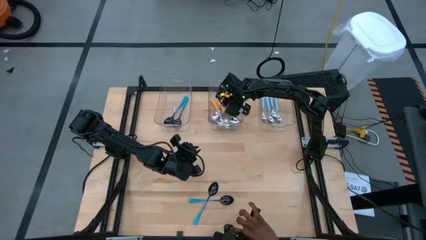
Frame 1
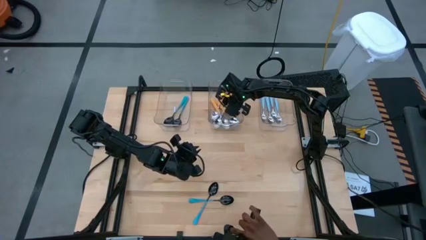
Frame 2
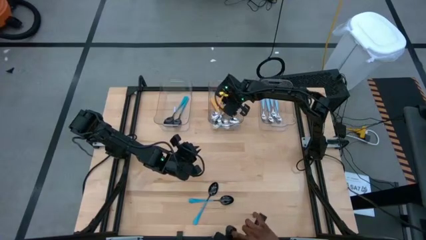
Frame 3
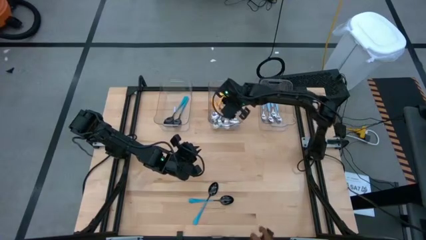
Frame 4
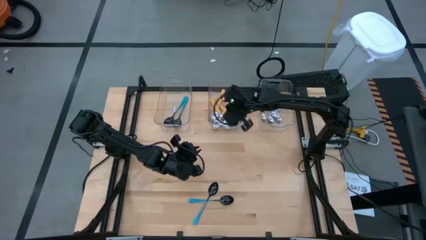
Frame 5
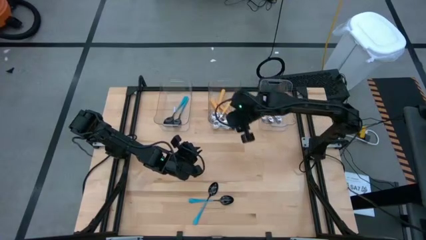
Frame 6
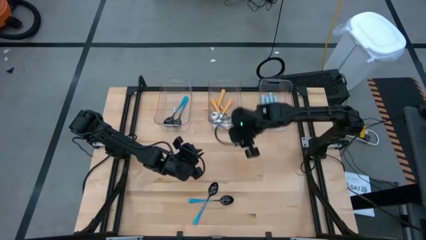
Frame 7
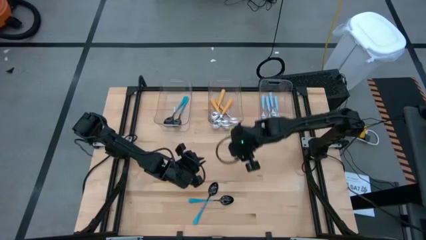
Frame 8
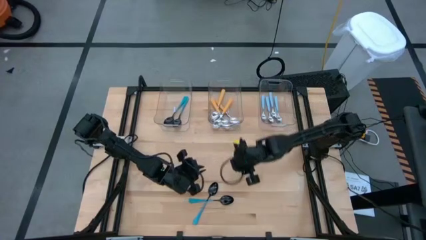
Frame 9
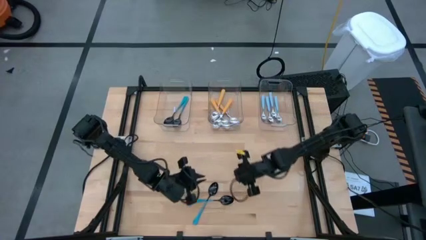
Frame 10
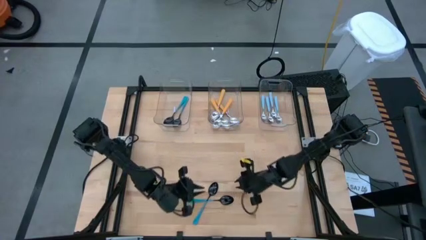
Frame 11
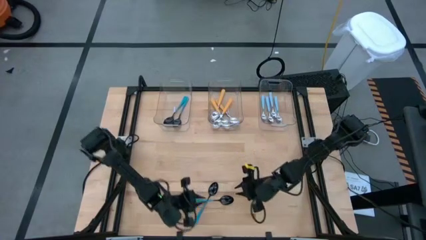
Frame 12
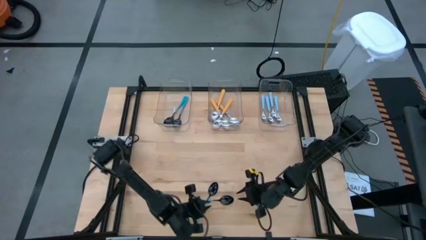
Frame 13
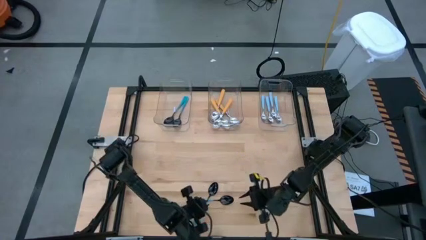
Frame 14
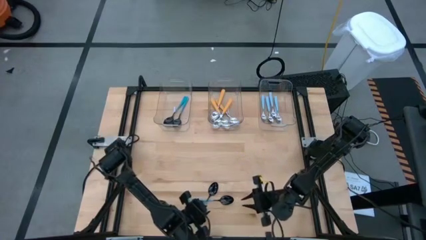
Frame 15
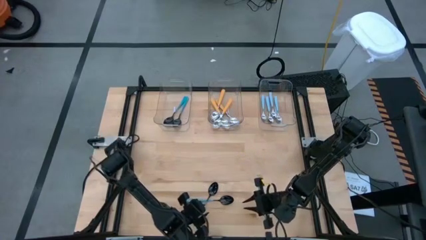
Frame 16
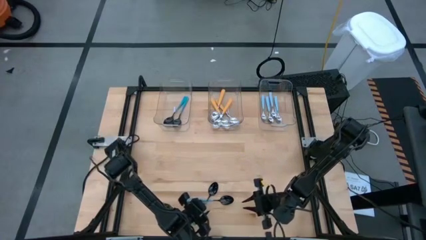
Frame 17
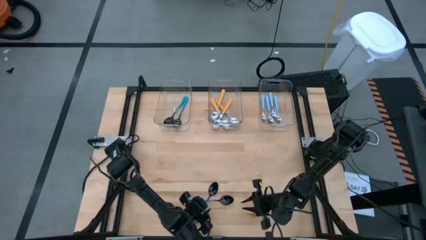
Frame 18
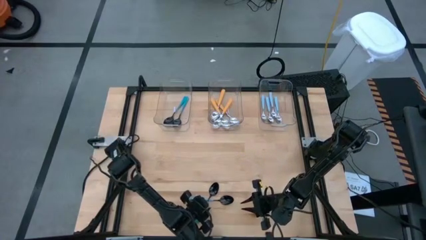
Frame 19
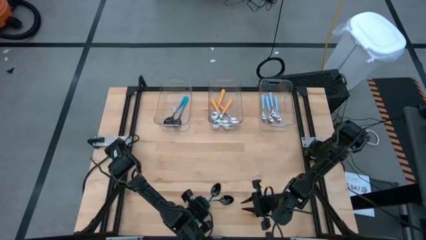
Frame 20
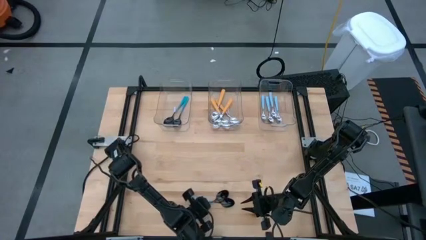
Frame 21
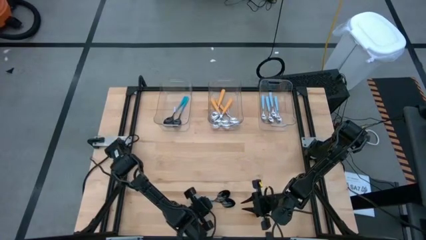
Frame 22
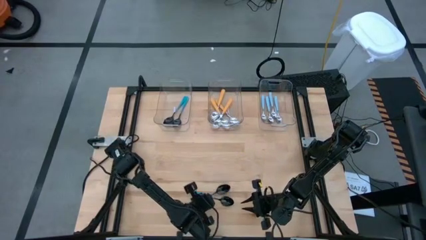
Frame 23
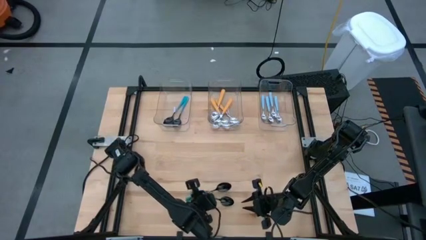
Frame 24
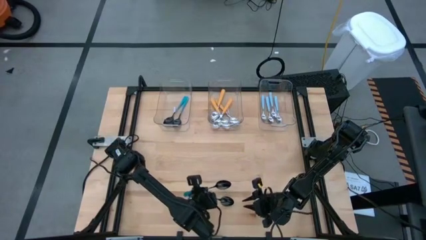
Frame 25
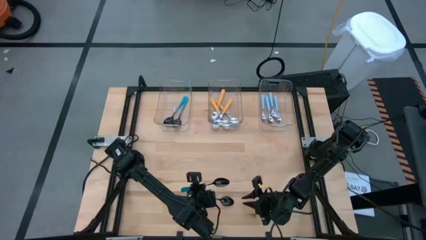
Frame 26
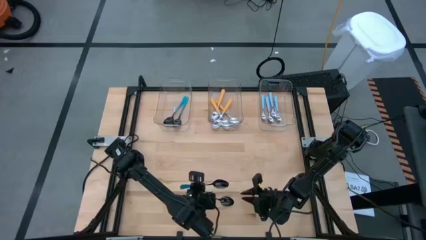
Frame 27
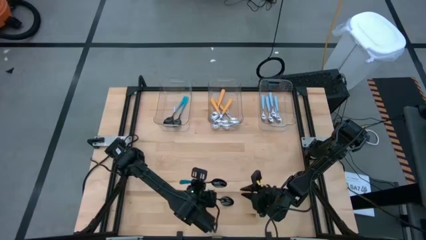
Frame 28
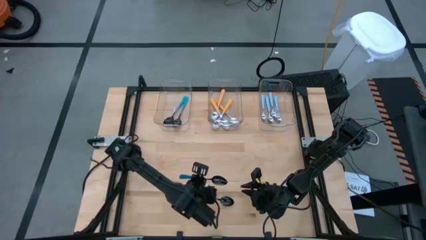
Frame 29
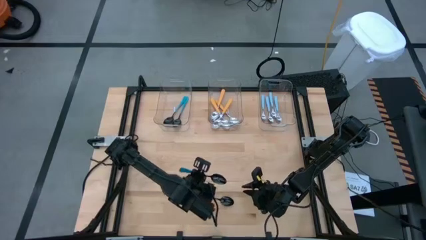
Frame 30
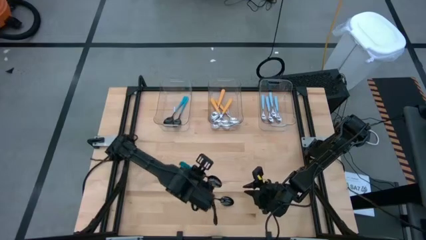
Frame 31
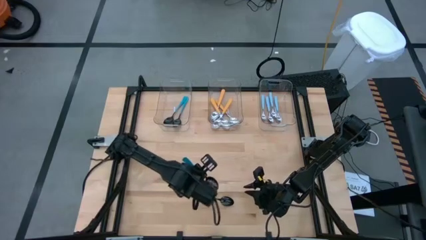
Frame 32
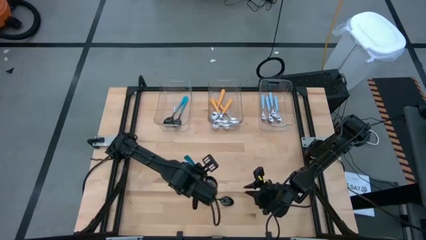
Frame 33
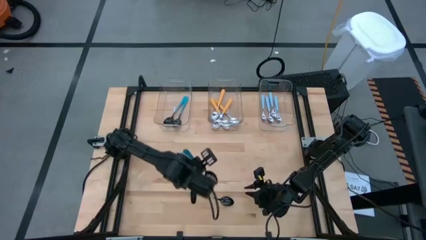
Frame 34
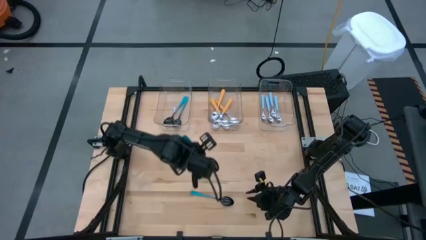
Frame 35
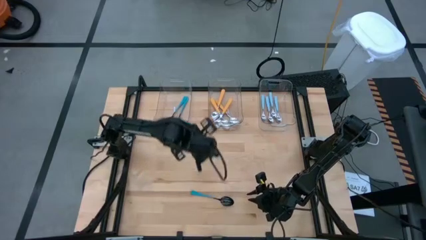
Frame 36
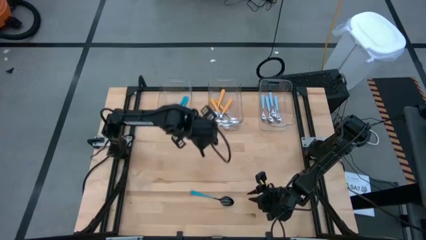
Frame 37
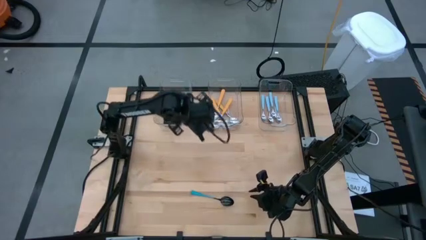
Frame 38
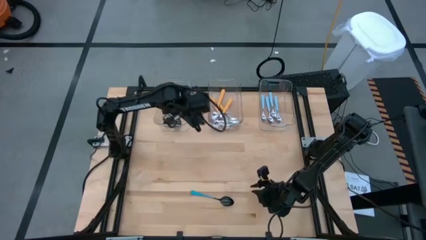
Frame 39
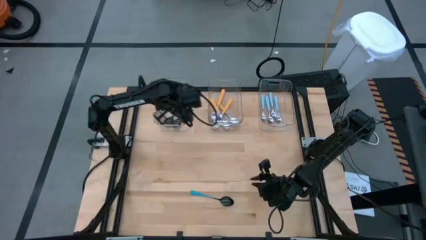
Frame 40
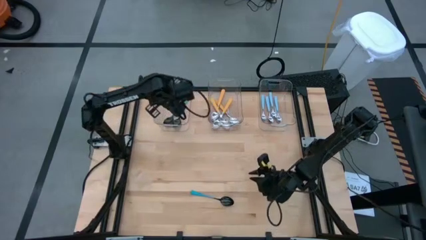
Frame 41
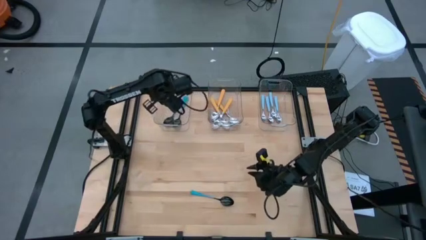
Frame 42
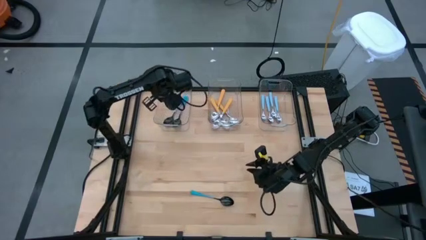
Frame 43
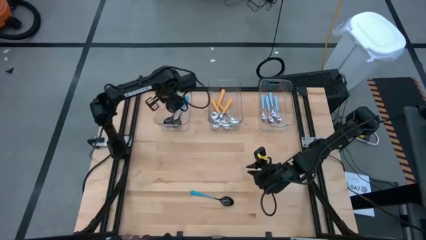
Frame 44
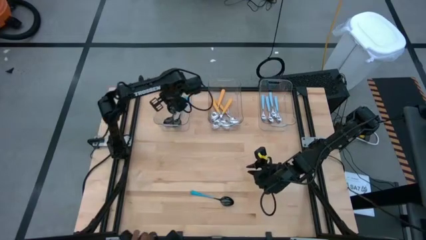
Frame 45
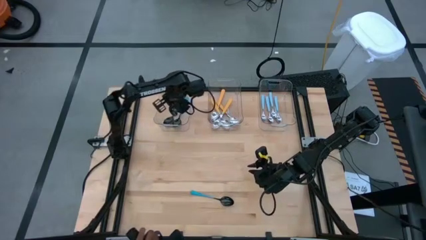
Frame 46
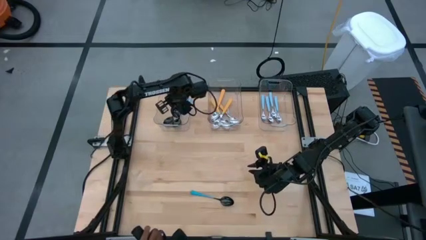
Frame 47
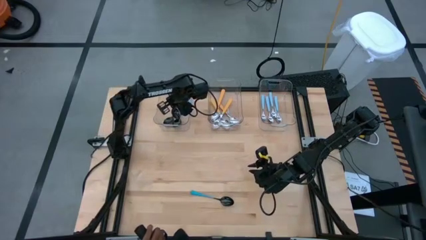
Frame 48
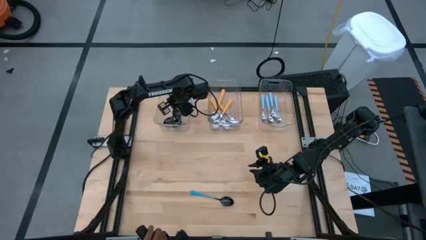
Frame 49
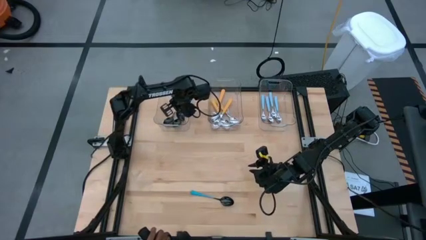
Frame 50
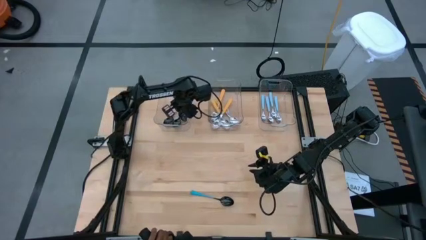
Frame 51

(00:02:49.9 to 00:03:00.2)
Task: Sort silverware by color (type)
Put the blue spoon into the left transparent bin

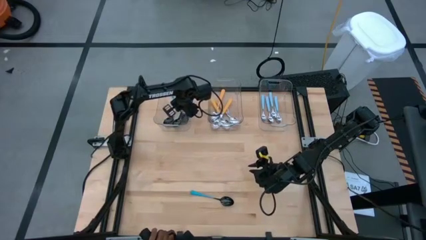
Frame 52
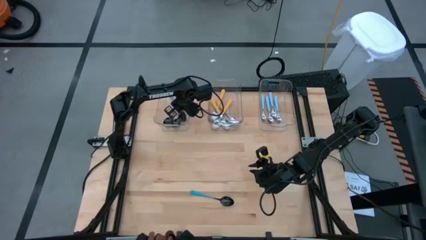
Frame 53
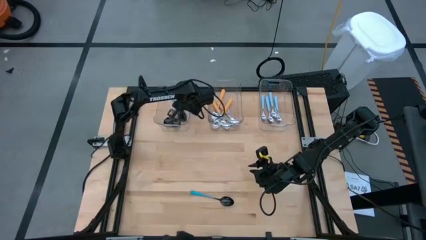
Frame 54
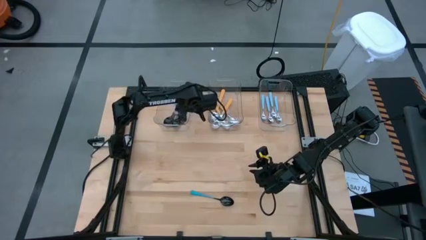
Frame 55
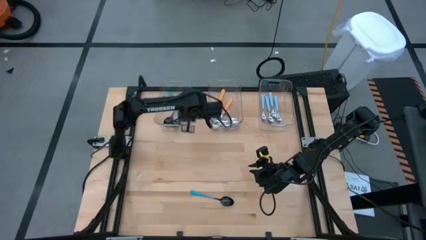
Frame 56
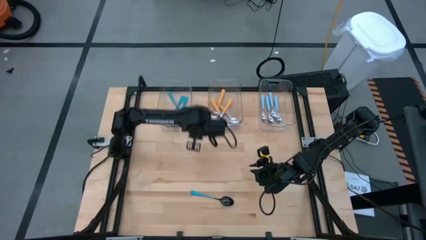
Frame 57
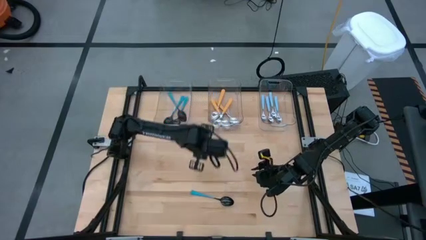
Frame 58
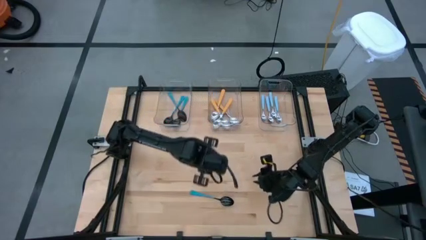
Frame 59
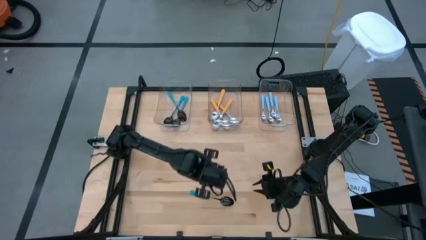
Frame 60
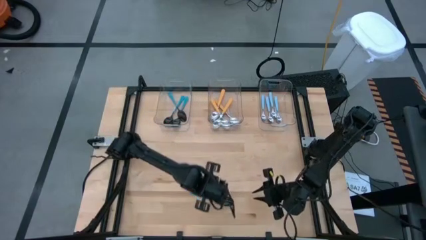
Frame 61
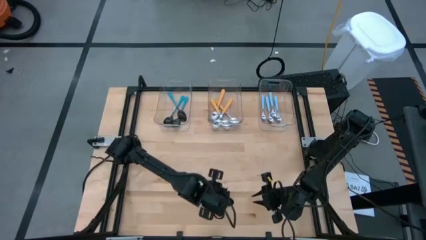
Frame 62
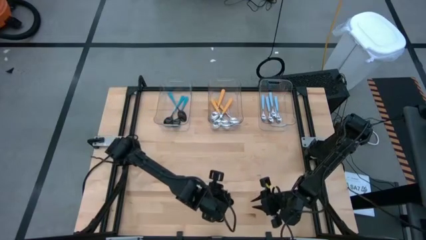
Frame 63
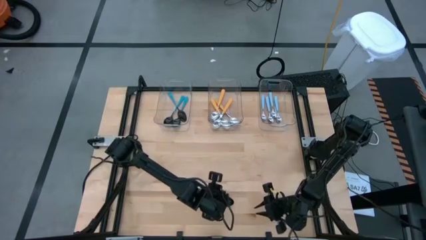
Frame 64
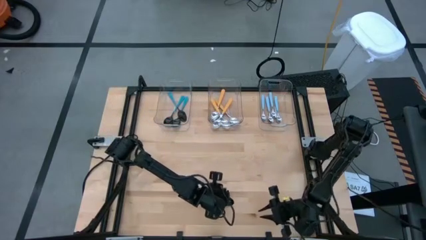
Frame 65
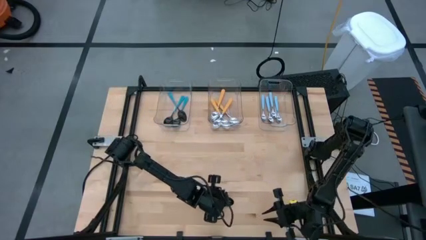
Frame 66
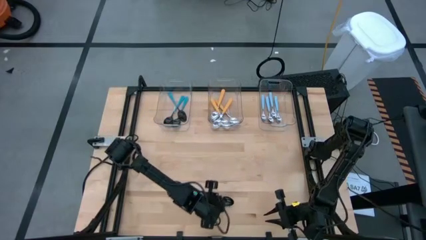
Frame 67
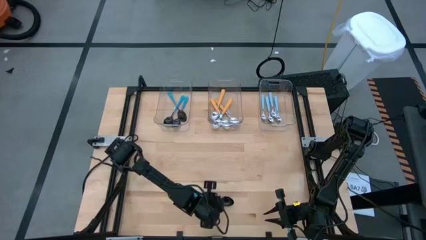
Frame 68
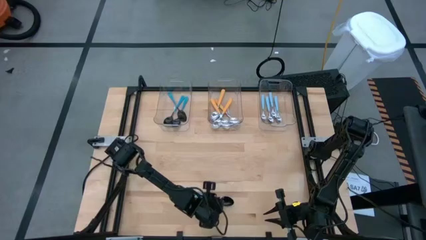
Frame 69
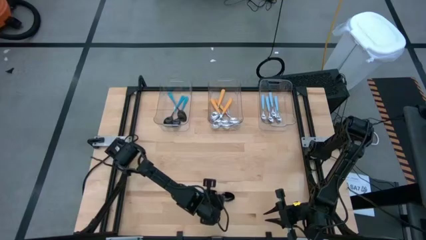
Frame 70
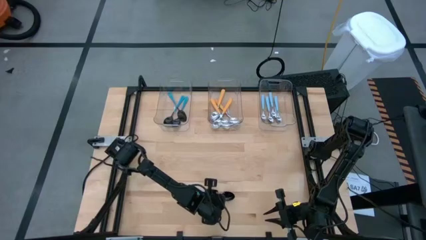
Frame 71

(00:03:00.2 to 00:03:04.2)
Put the blue spoon into the left transparent bin

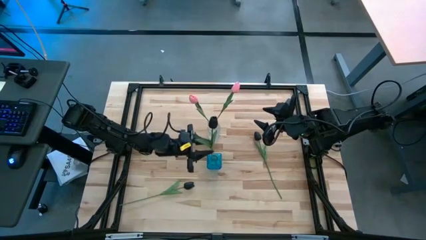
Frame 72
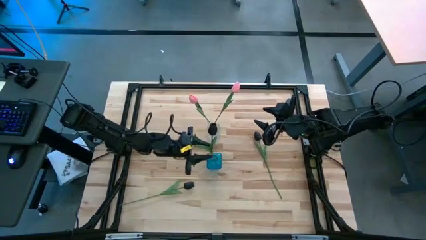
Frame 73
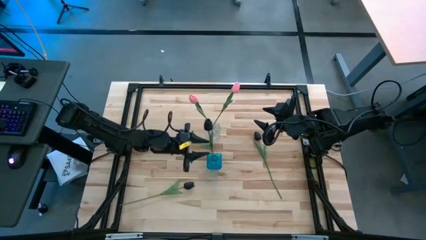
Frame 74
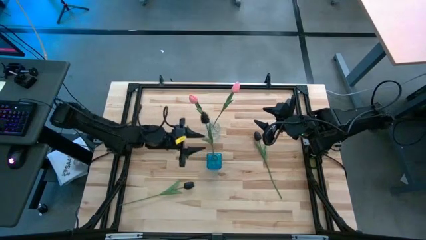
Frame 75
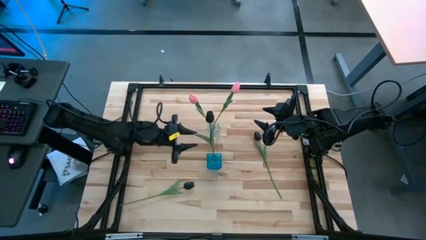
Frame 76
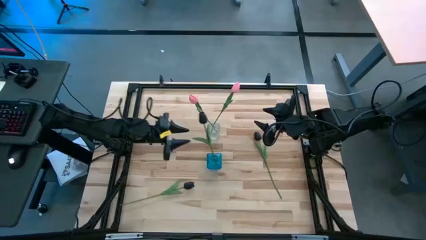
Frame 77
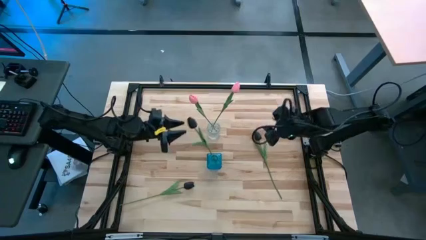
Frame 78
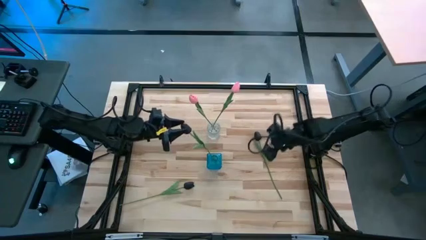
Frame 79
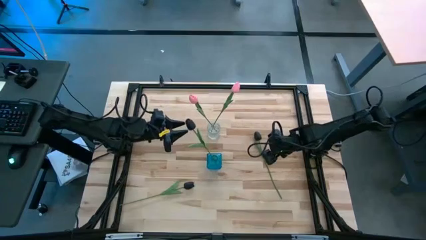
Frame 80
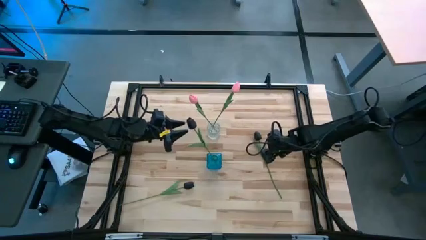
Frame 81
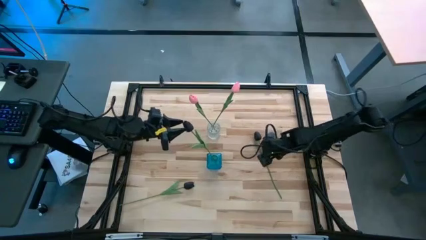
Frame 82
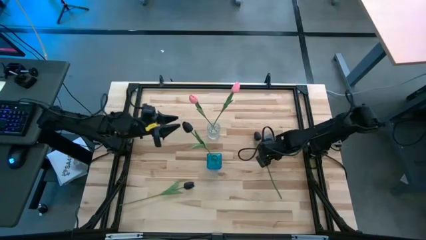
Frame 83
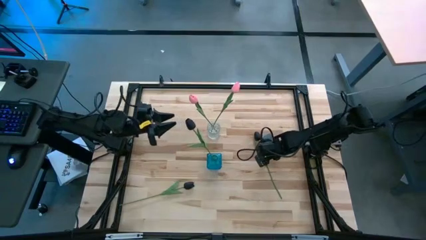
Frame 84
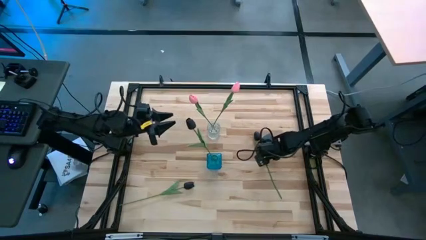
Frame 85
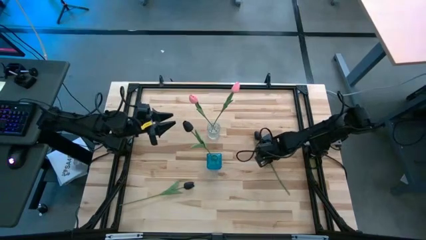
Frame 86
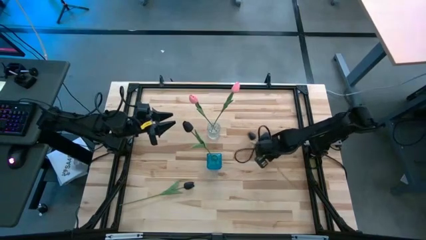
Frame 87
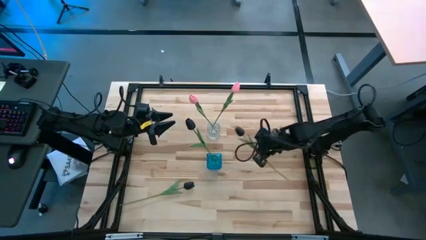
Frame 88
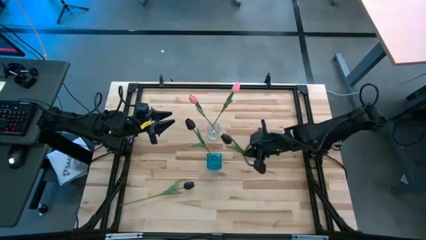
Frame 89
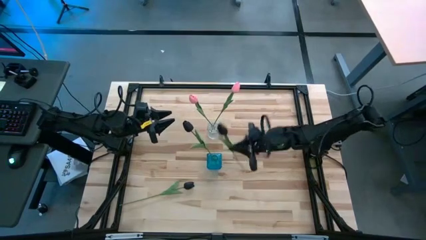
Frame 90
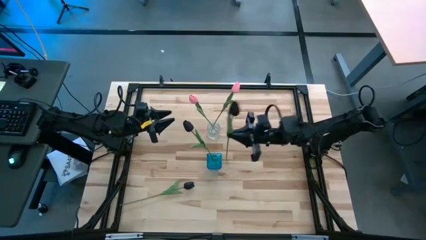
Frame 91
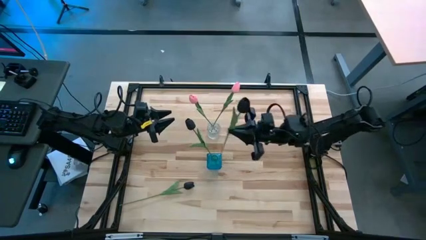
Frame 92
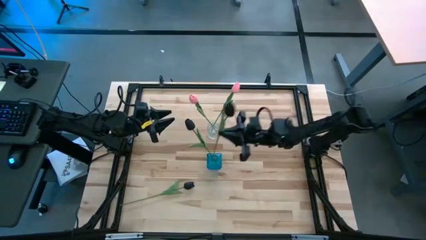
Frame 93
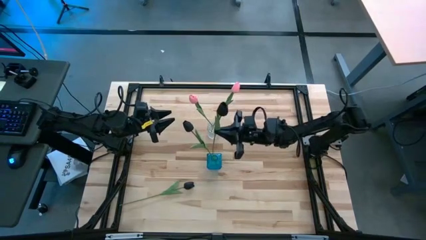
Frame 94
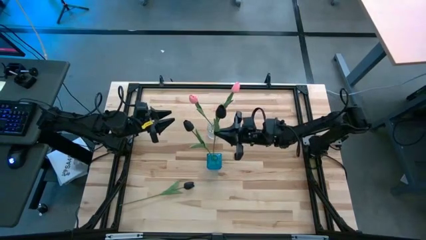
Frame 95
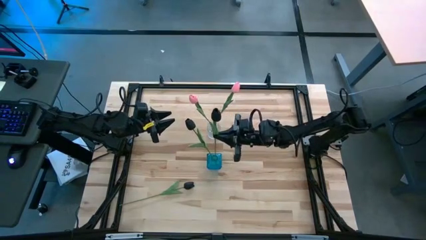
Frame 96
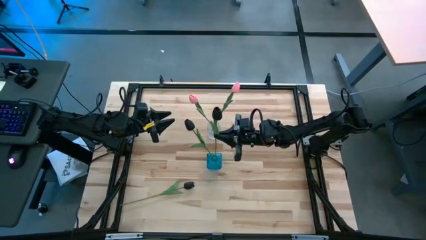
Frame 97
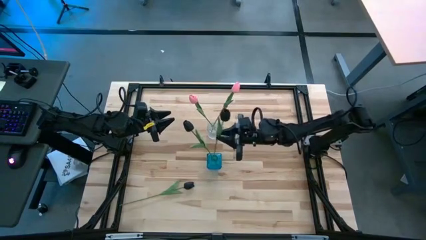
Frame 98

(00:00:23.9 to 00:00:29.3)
Task: Sort flowers into vase by color
Put the right black tulip into the blue vase
